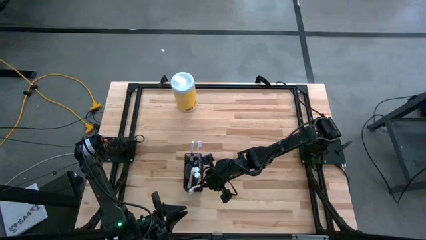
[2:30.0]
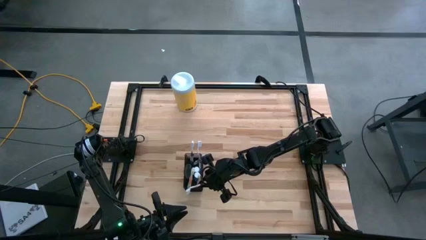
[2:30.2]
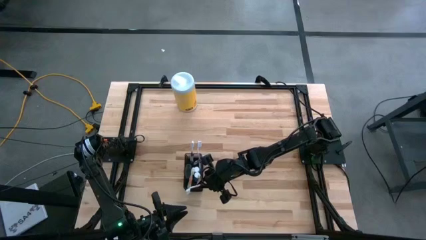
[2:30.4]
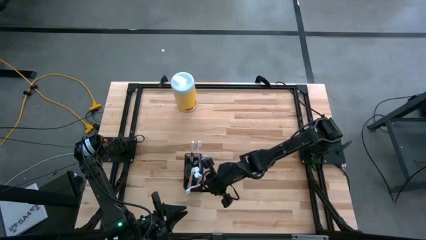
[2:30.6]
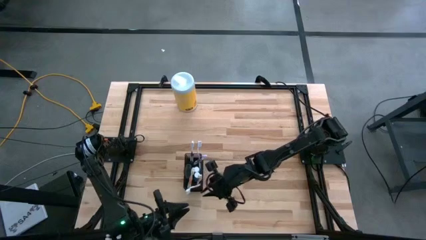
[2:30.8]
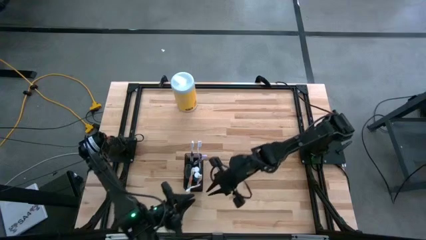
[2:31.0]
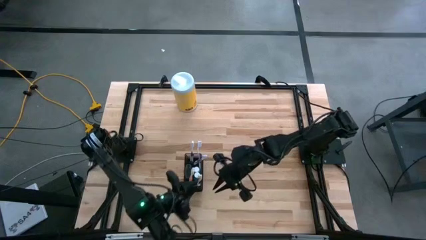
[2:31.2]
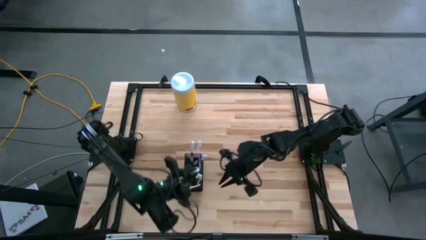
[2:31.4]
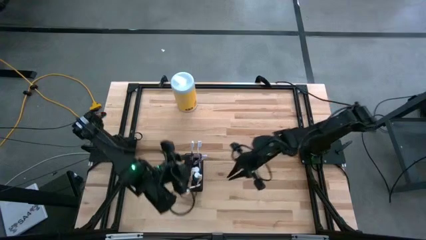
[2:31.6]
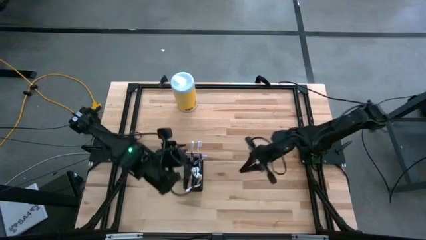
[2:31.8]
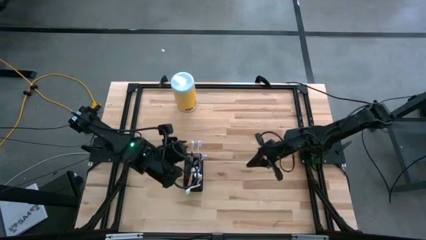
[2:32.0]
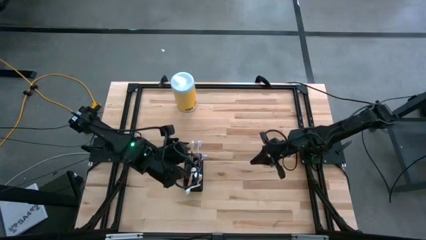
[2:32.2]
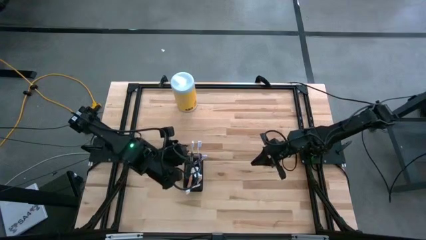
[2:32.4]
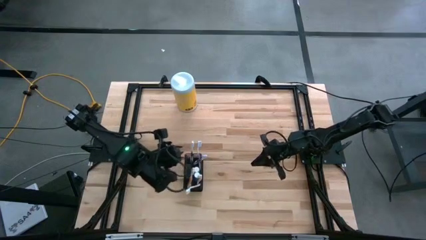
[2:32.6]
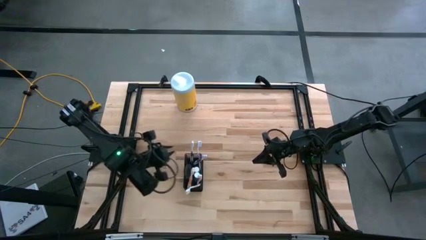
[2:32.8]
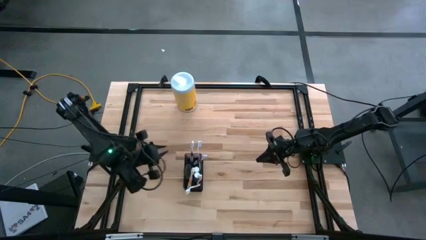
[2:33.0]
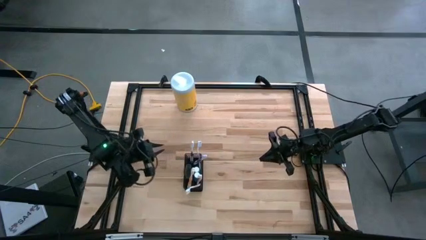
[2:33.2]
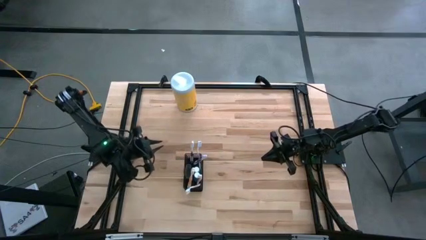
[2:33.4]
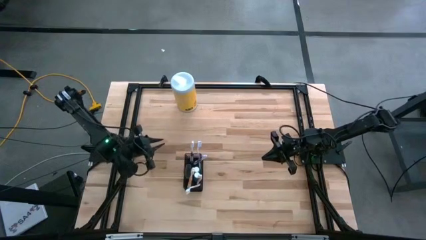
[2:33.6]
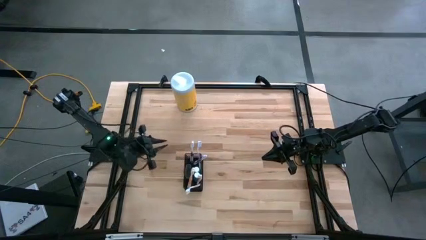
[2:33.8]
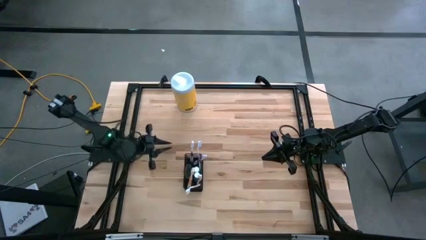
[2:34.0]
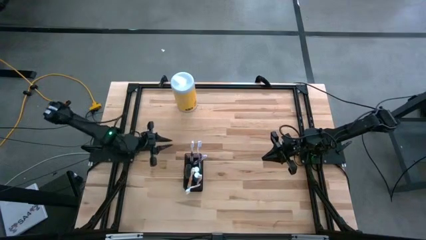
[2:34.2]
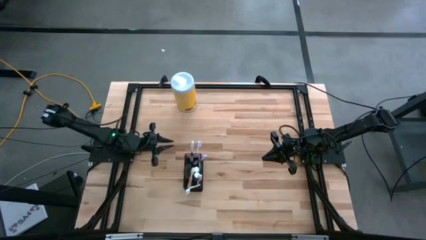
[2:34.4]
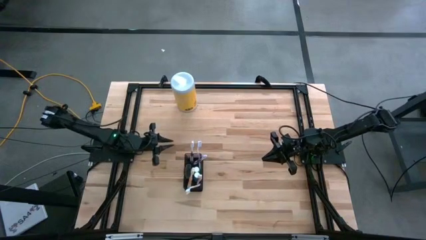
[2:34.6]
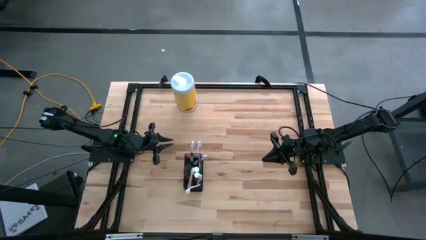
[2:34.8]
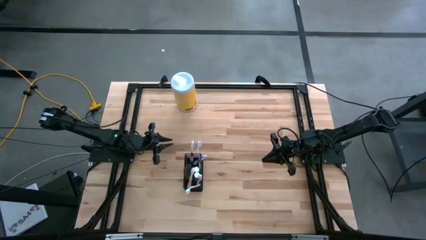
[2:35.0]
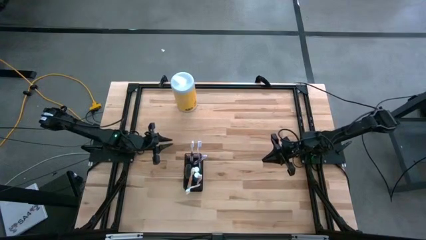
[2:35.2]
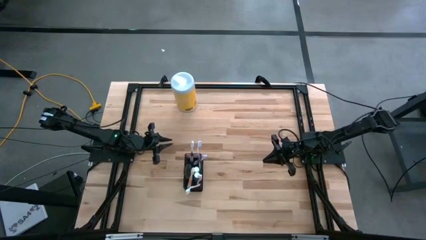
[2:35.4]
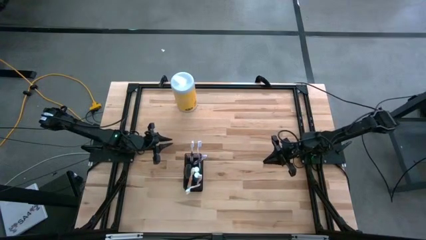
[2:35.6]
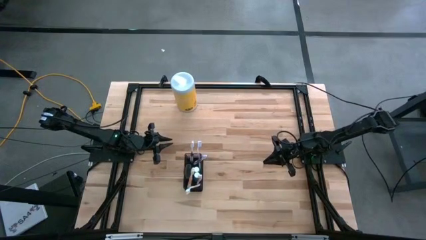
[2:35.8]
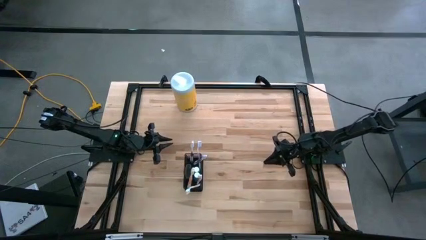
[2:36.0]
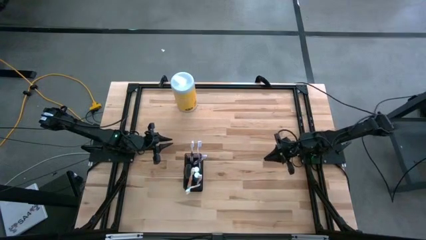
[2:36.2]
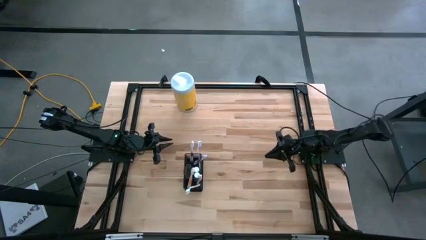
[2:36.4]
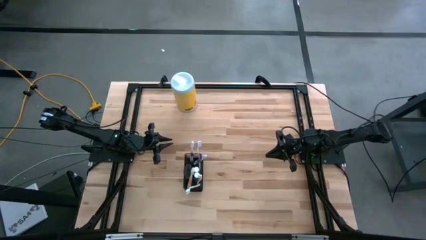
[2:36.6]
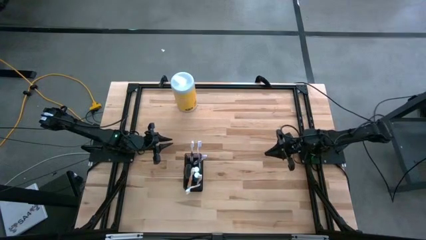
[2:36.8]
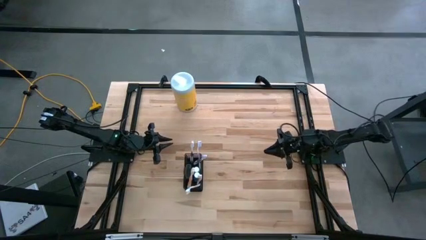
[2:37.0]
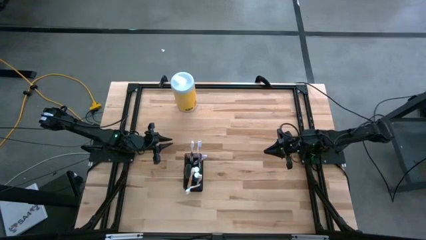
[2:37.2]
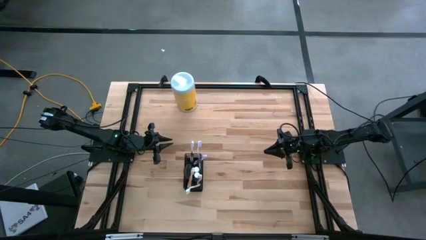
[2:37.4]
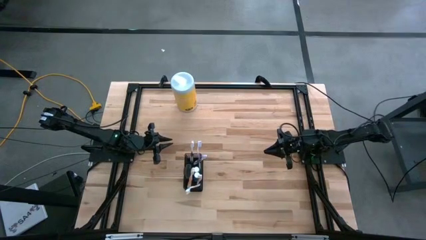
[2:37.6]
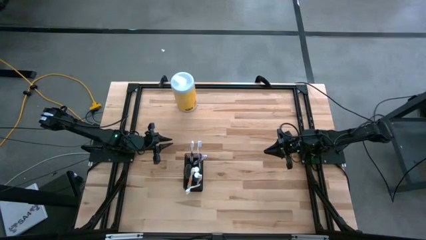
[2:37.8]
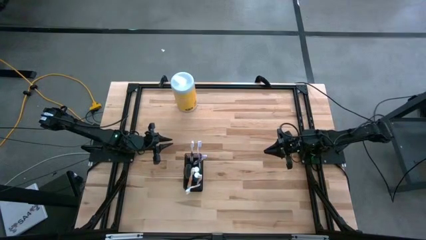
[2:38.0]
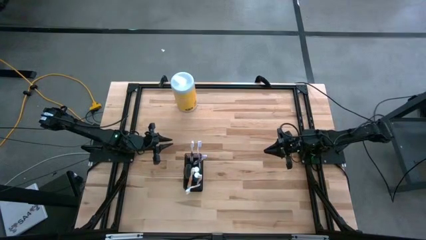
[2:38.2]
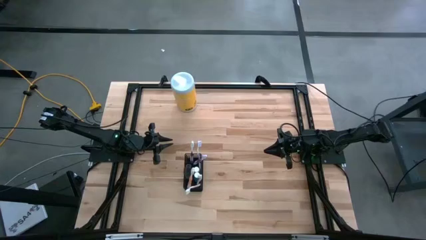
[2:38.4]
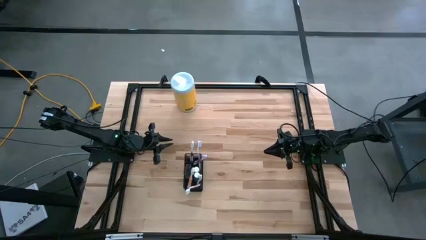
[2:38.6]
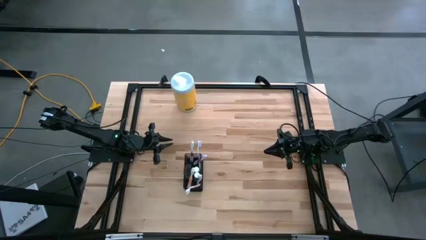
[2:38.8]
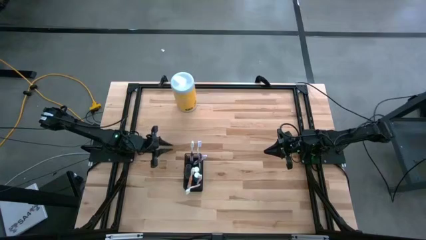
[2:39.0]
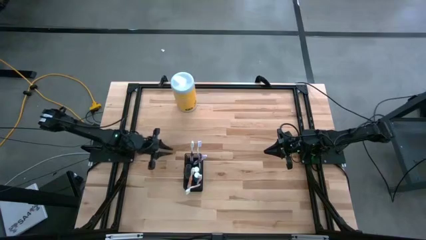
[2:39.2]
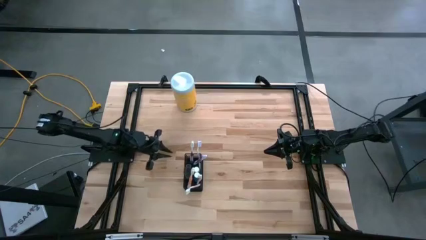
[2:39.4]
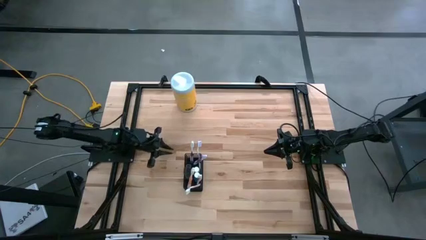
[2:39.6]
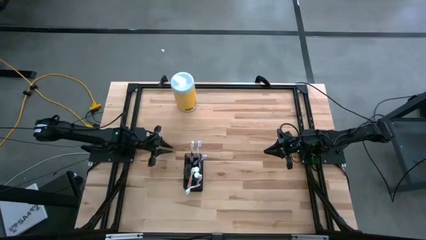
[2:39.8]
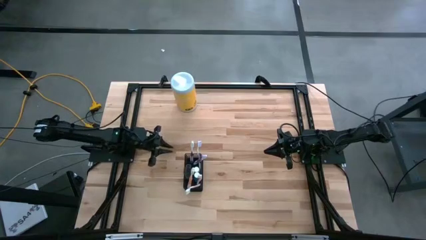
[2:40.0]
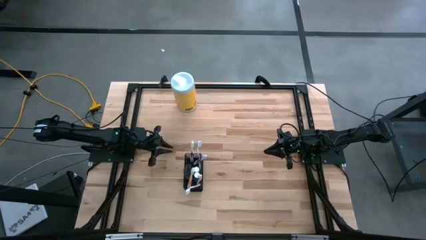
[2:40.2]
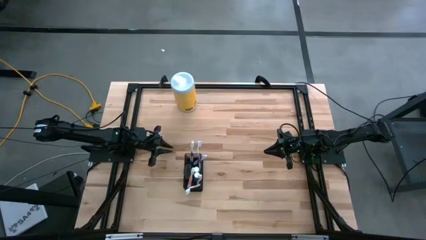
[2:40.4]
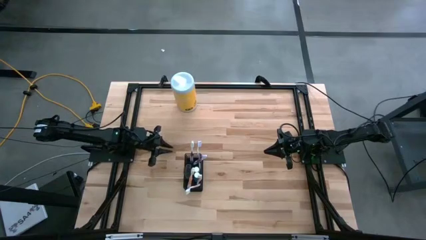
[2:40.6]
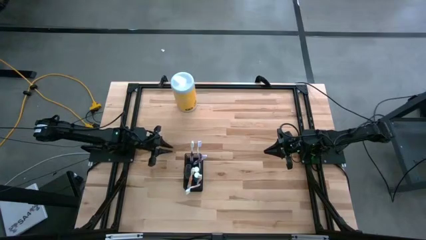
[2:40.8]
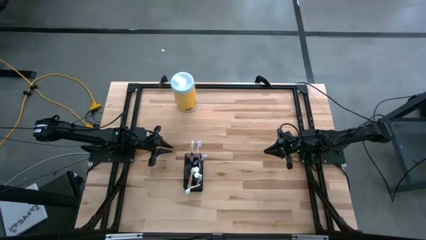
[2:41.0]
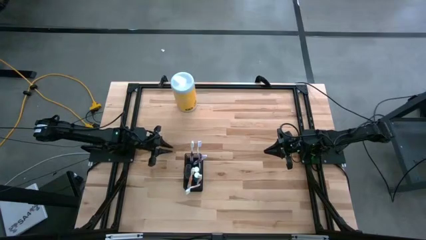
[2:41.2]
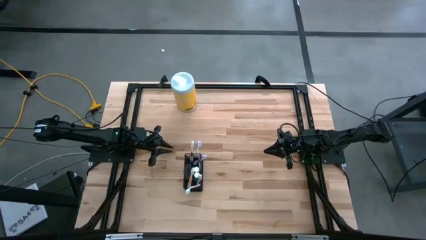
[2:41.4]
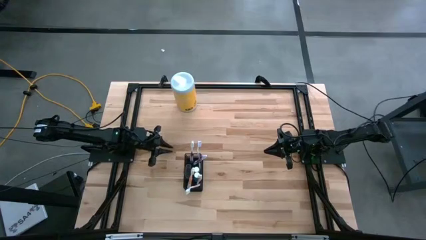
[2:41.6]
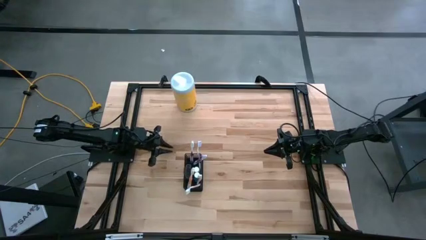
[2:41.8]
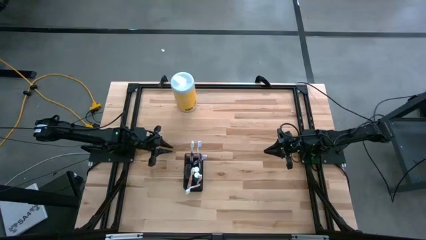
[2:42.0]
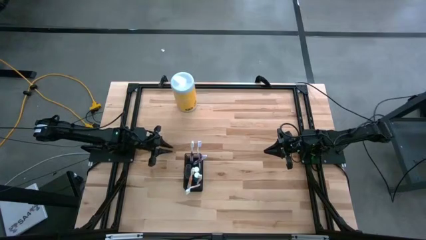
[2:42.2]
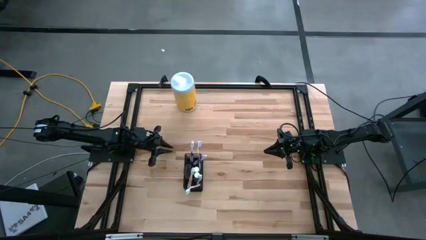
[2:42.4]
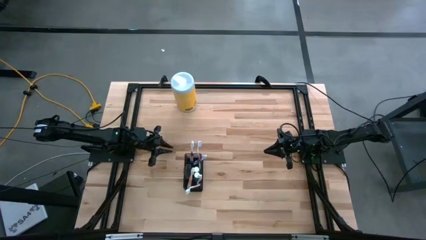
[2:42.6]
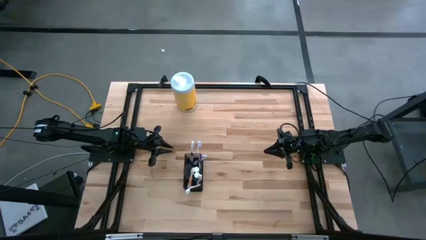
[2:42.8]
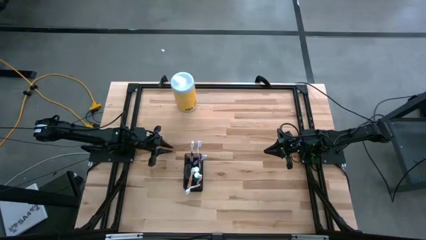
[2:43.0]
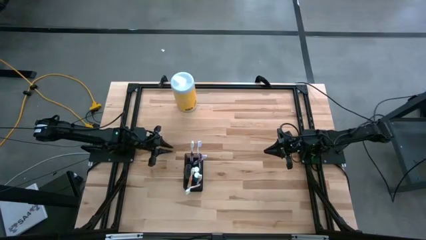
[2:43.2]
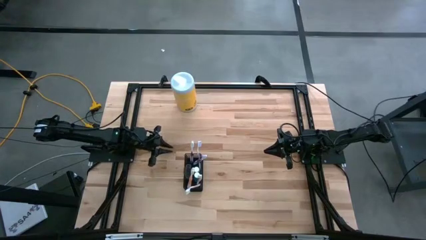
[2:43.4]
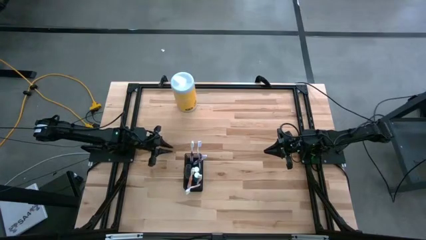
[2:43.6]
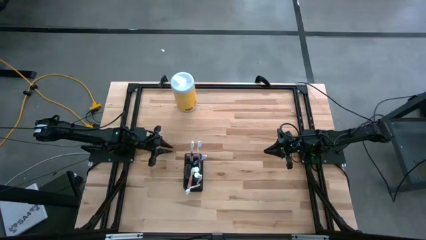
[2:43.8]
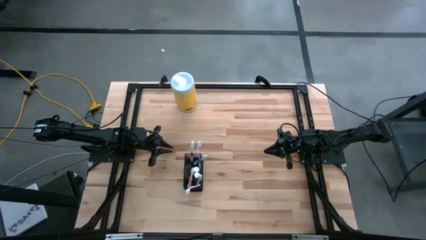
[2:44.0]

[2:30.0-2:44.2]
Task: Pick & Place toothbrushing station
Return to Home Position
